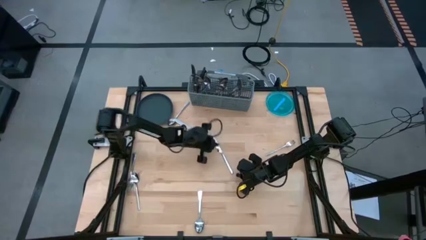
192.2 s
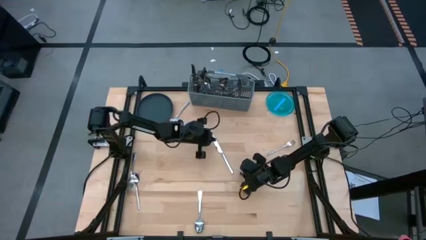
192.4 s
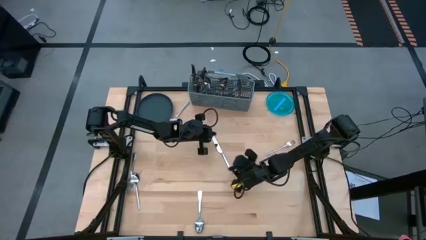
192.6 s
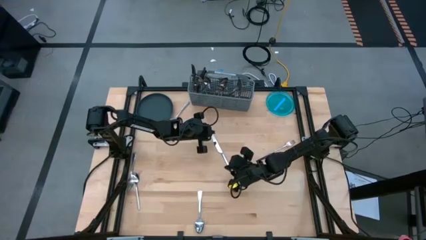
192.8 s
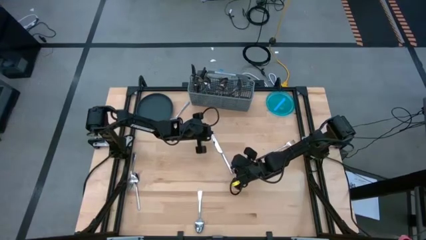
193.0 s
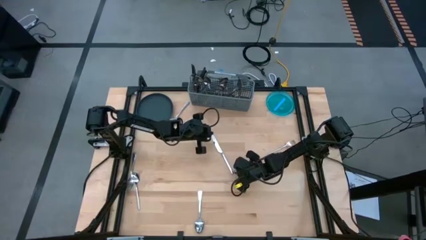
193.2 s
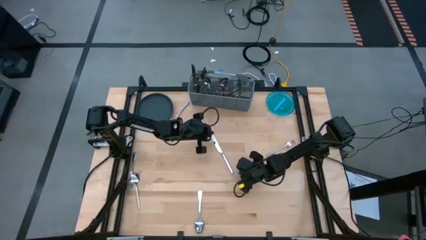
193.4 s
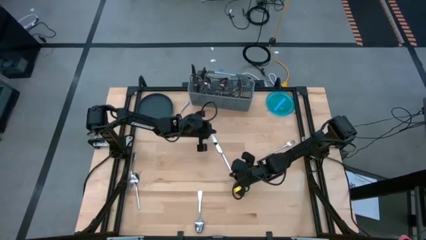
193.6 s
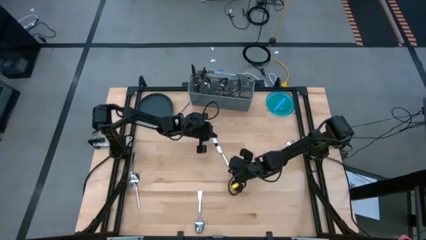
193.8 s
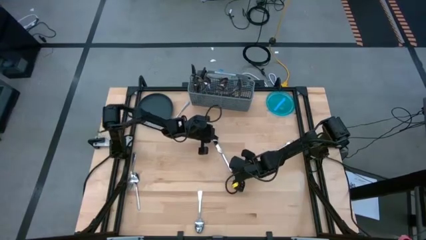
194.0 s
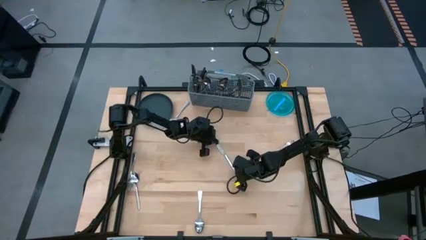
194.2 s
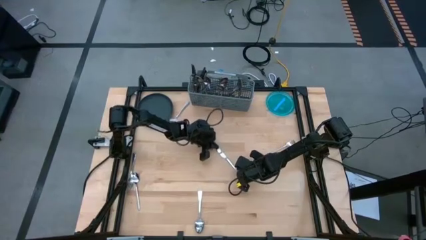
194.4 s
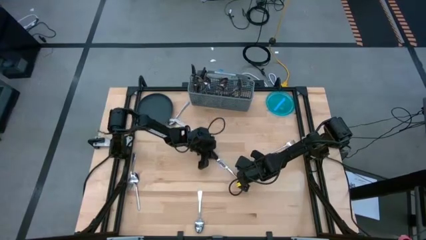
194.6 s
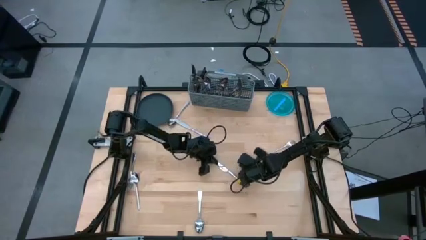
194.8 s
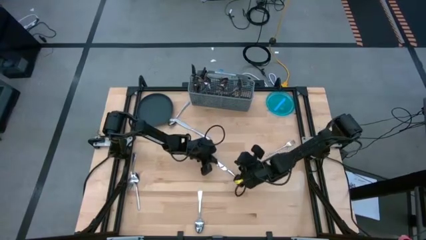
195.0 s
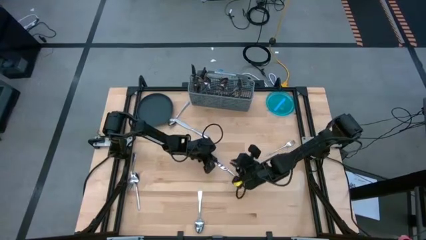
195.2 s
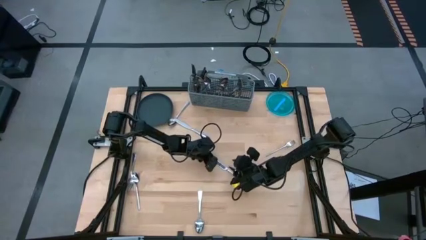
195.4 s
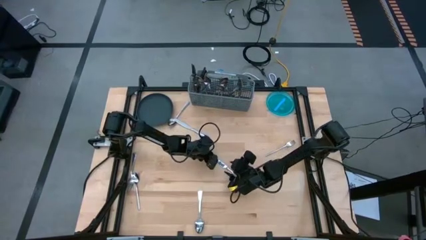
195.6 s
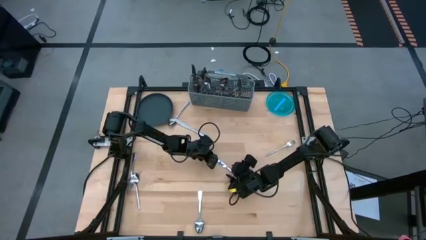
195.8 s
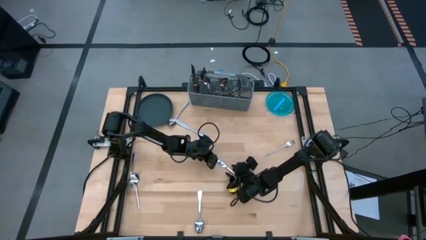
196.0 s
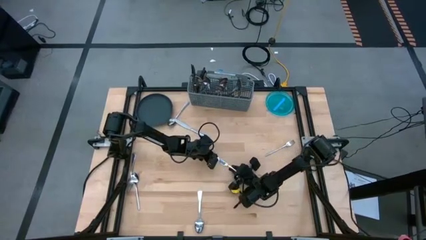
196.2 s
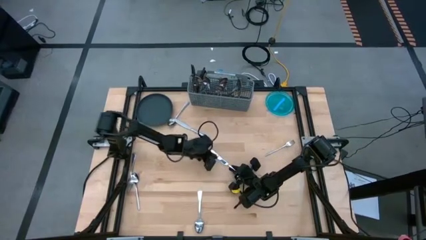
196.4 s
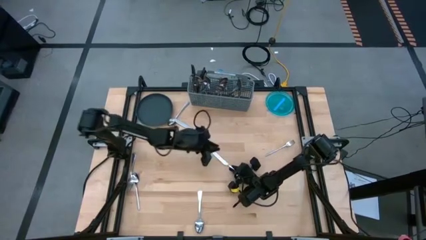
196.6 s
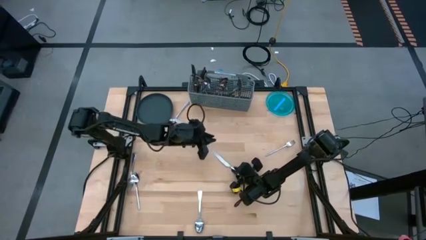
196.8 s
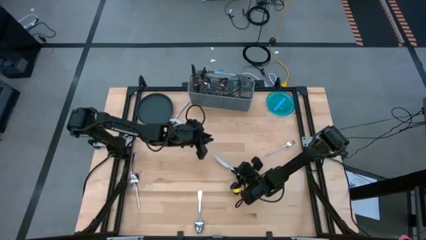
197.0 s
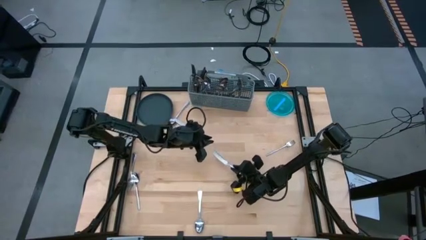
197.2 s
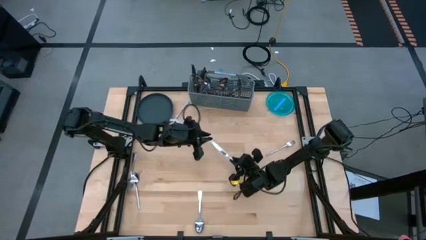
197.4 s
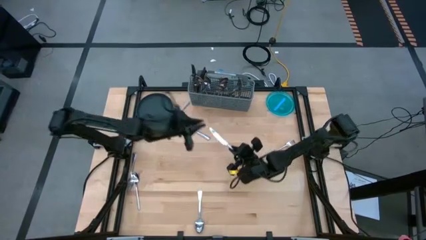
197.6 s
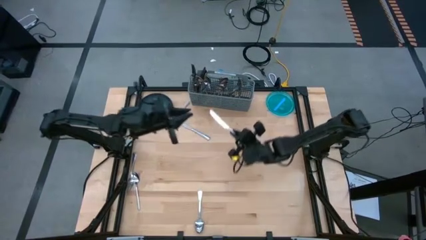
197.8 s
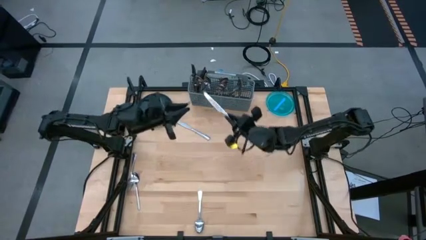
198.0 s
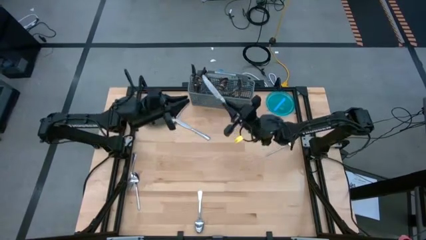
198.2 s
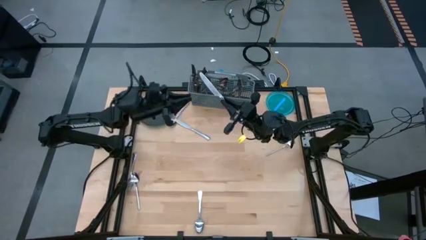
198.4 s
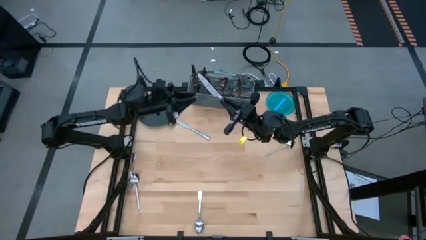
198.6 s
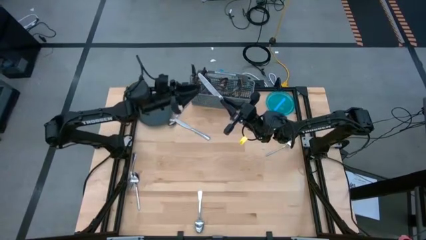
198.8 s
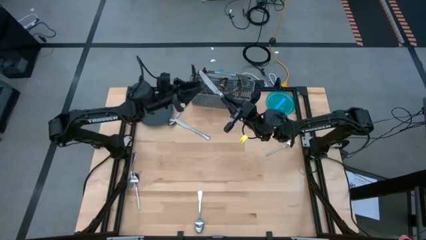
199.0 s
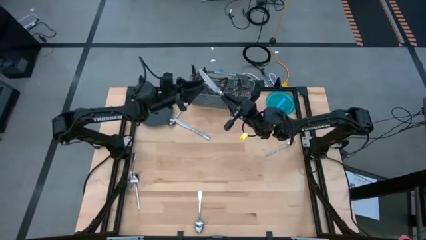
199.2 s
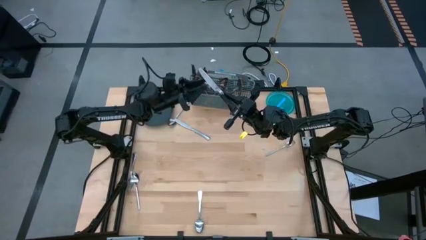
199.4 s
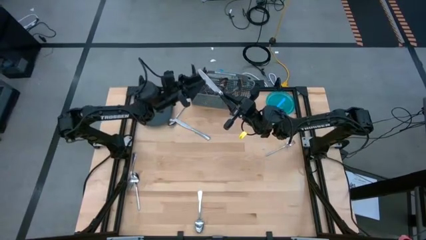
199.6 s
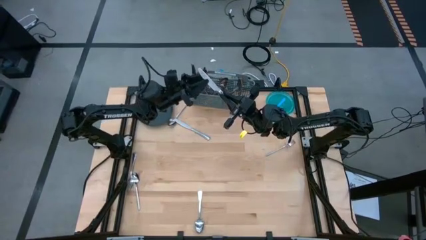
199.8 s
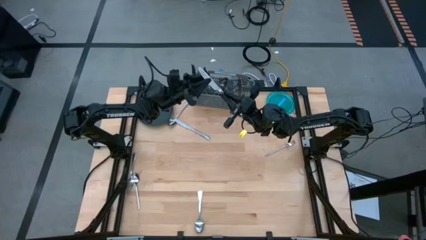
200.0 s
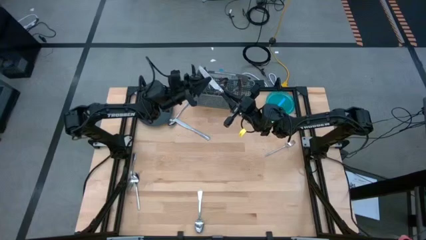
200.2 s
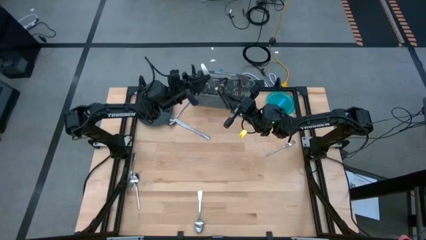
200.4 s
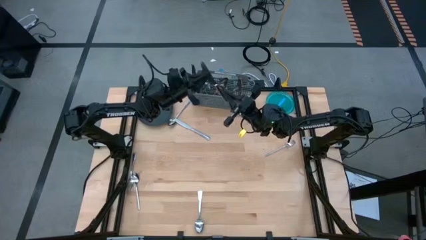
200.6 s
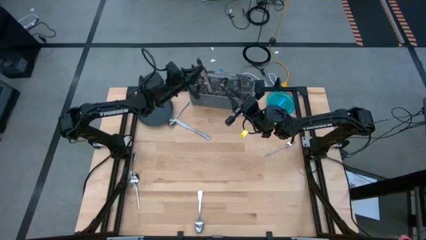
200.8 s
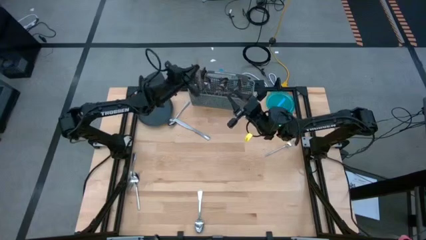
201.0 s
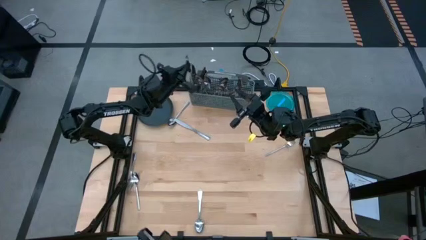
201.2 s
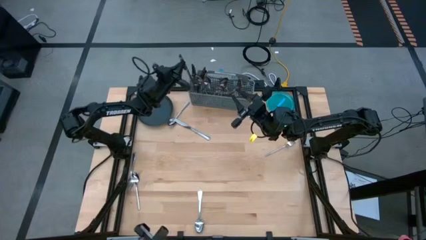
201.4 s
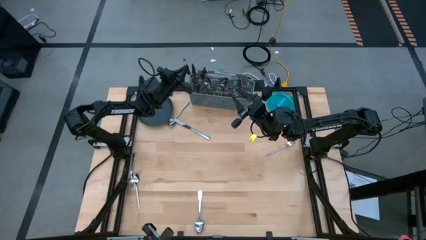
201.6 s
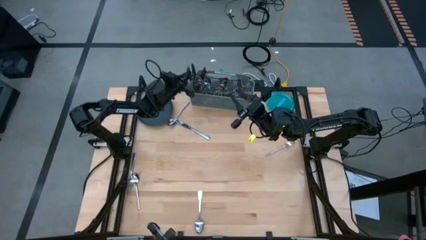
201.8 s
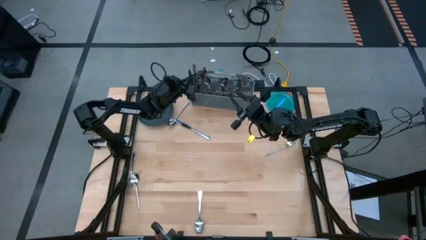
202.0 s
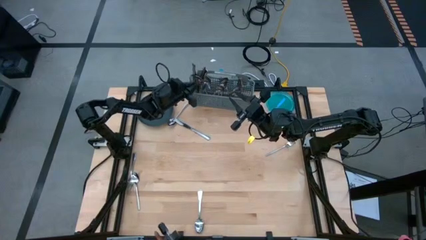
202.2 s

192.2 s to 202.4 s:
Task: Sort silverware
Put the knife into the silverware basket

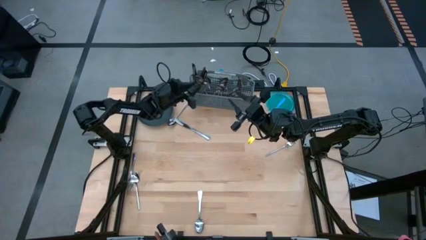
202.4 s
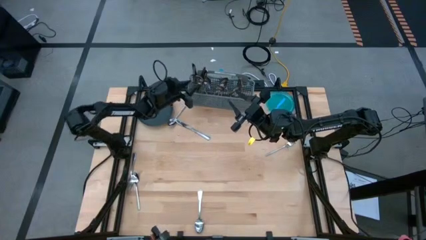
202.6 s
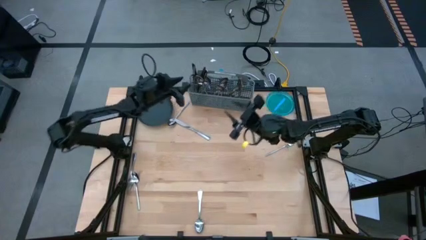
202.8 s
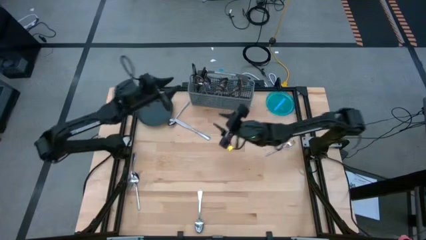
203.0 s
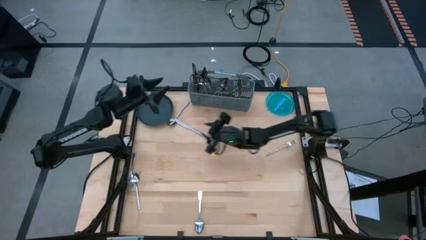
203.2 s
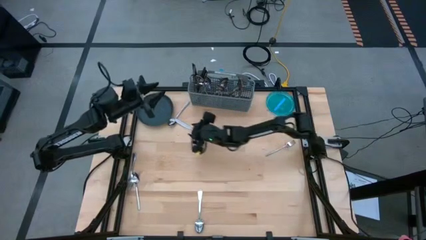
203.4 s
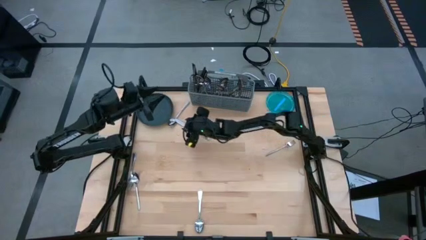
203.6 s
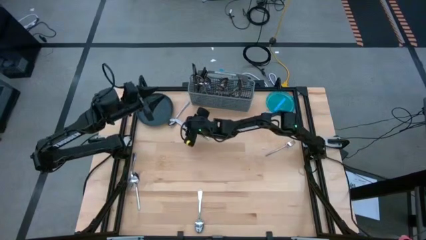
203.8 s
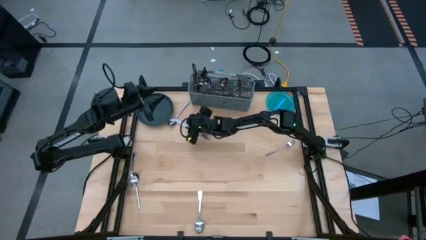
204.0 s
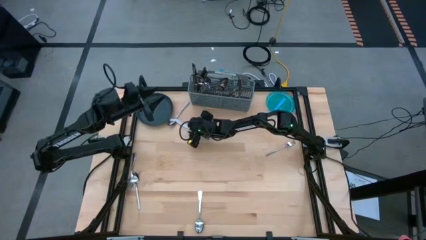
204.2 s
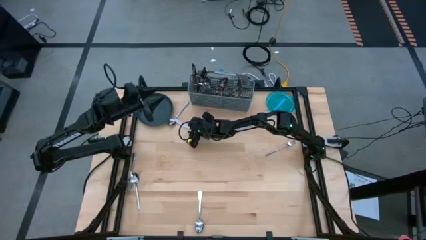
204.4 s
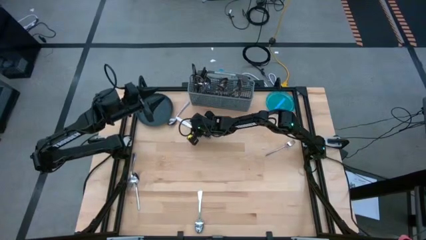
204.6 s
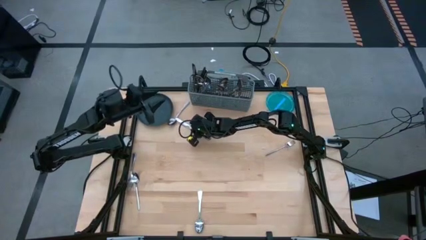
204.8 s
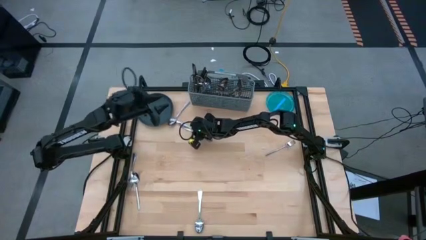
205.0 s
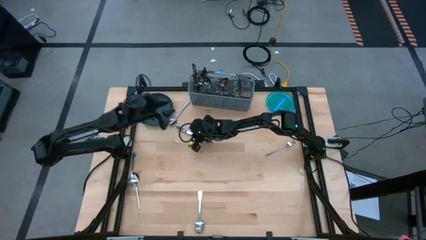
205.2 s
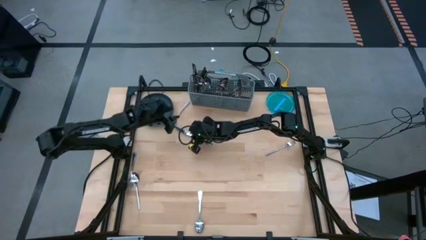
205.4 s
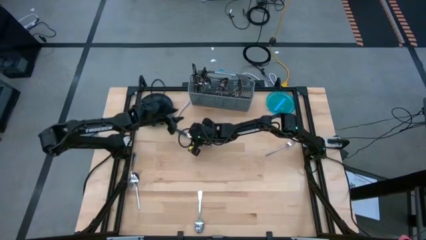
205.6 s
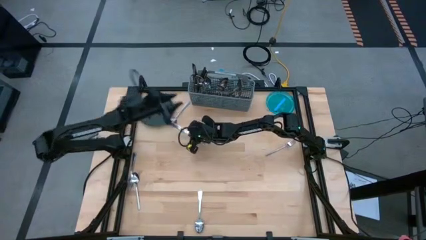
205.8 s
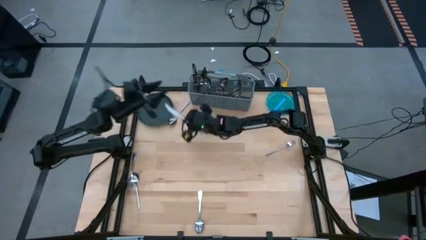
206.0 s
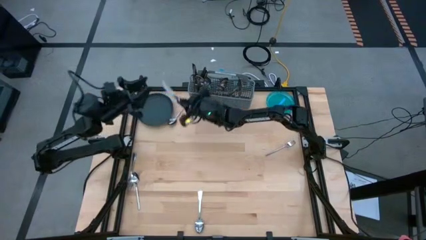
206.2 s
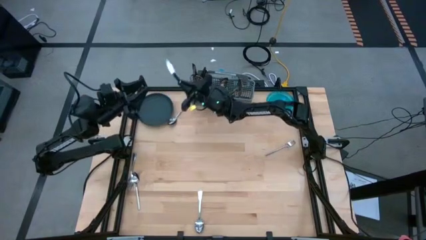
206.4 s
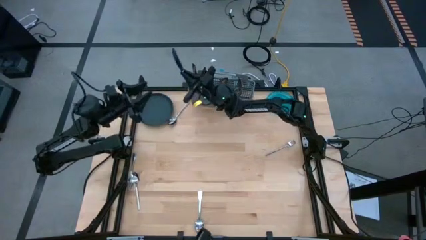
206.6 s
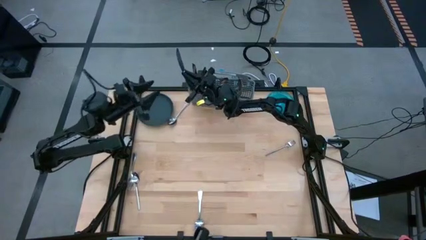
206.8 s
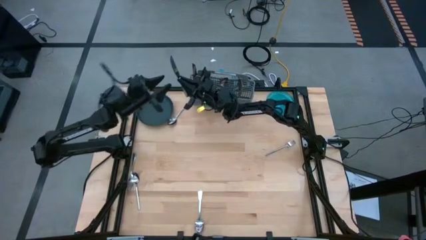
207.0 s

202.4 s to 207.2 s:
Put the knife into the silverware basket
